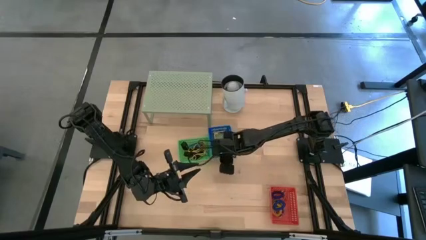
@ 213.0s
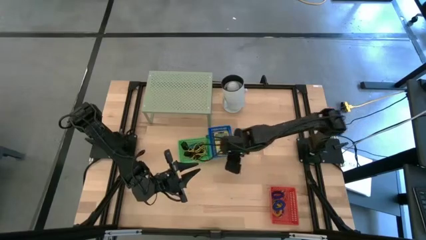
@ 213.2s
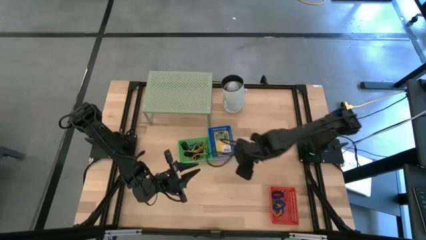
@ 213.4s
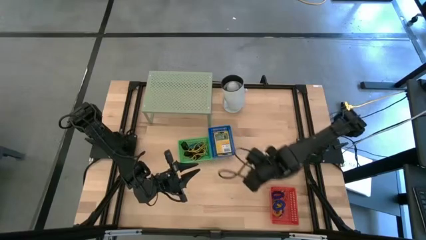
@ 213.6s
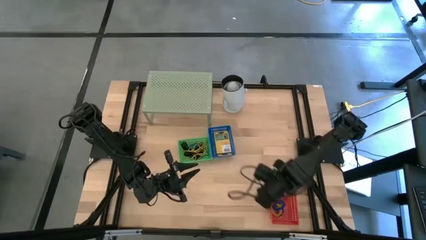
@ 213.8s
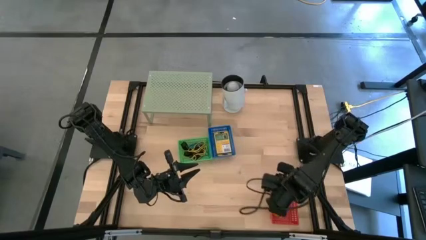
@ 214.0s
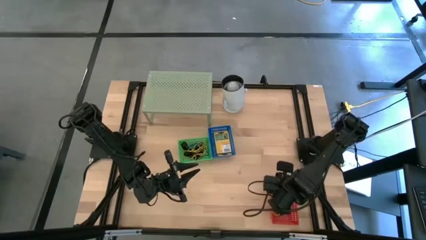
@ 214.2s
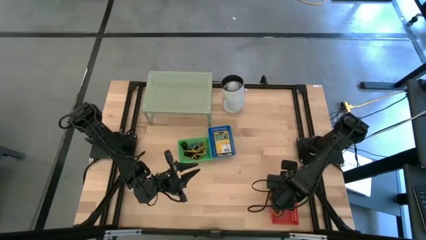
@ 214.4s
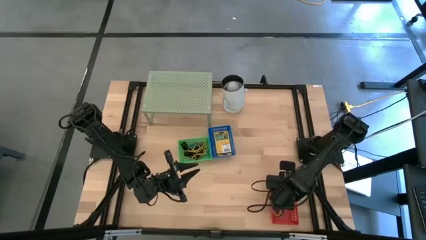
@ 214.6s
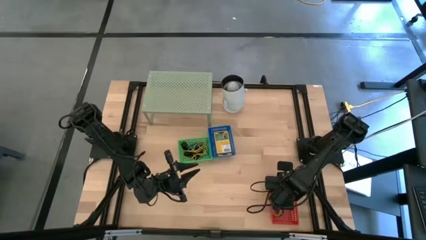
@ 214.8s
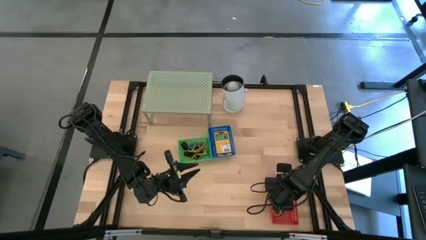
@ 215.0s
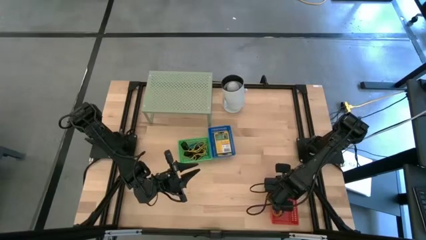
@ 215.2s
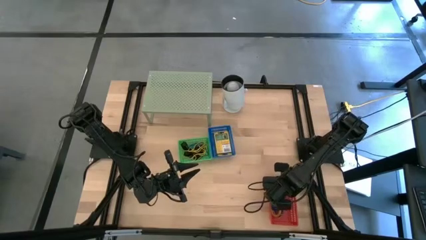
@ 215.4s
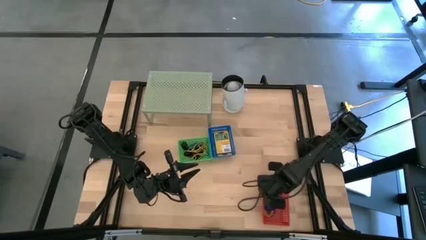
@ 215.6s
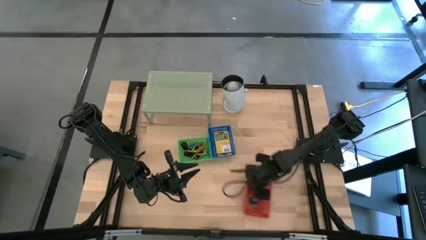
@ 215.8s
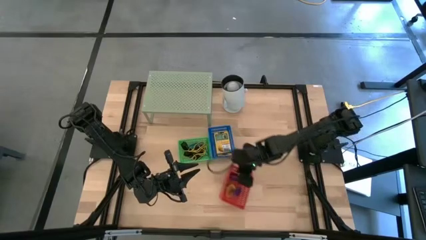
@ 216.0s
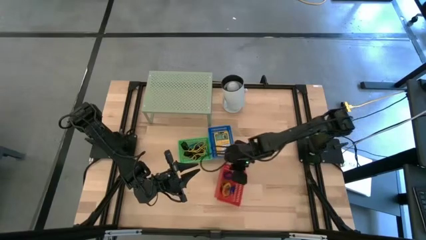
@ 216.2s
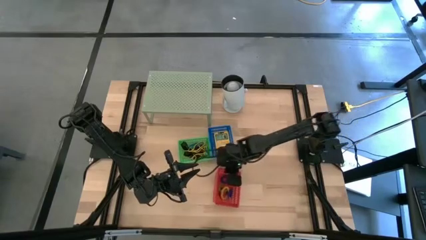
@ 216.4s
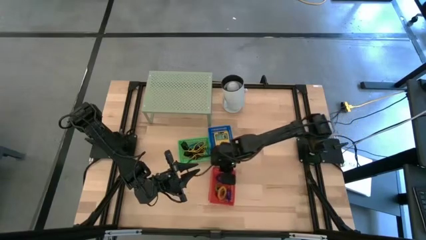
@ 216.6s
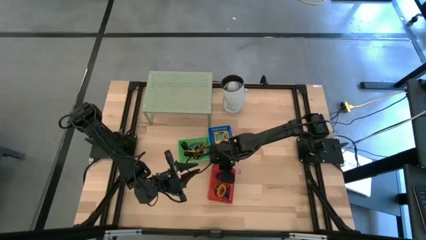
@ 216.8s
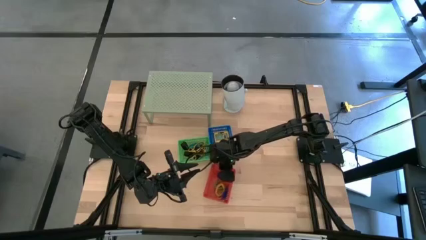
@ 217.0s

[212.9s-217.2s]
Task: Pick & Place Office Desk Supplies
Move the red bin to the center of the table

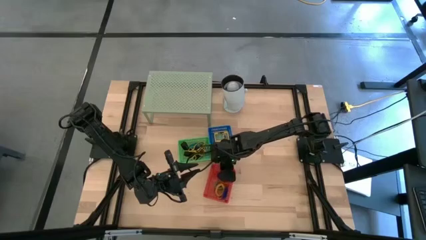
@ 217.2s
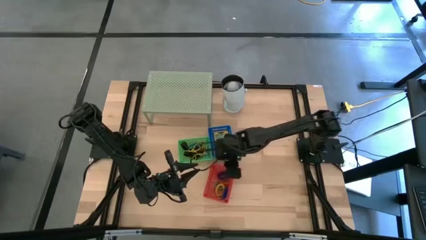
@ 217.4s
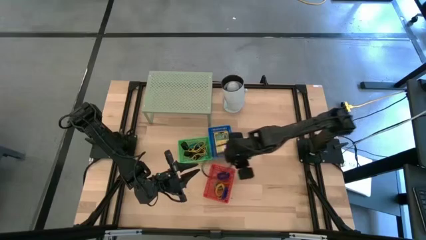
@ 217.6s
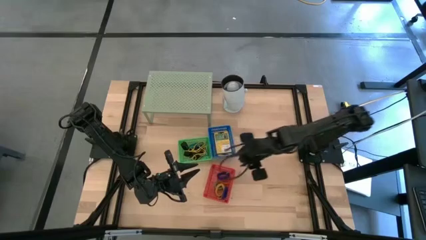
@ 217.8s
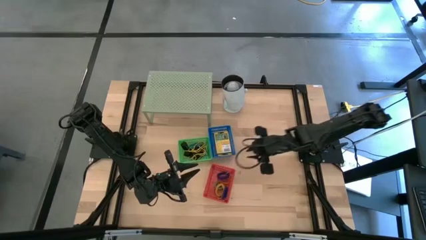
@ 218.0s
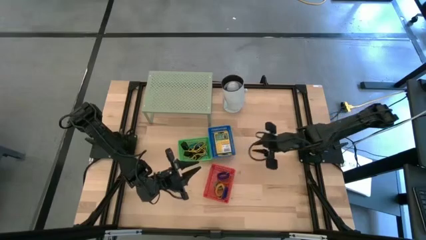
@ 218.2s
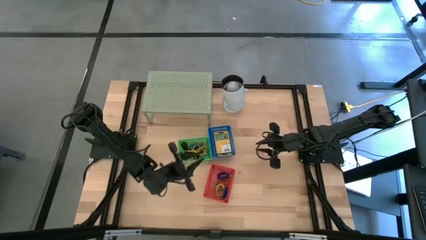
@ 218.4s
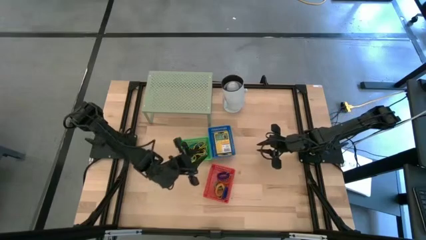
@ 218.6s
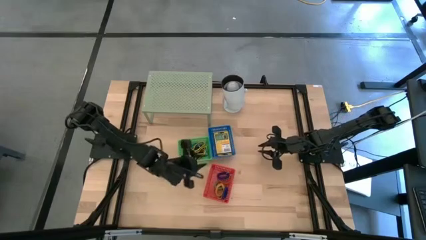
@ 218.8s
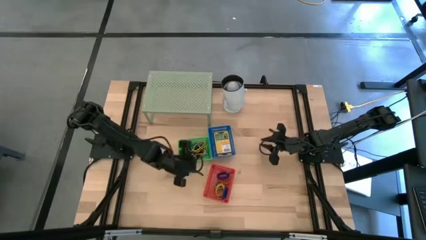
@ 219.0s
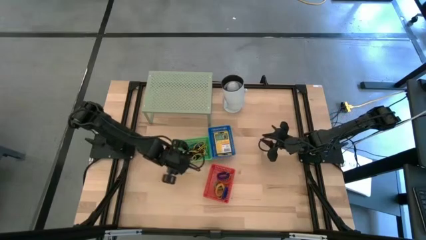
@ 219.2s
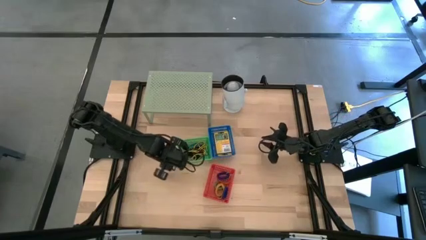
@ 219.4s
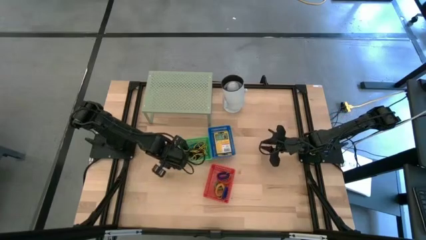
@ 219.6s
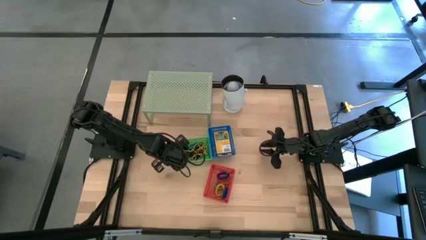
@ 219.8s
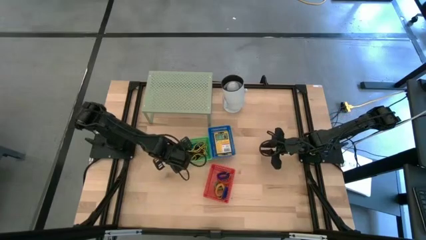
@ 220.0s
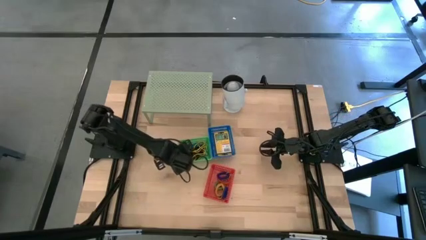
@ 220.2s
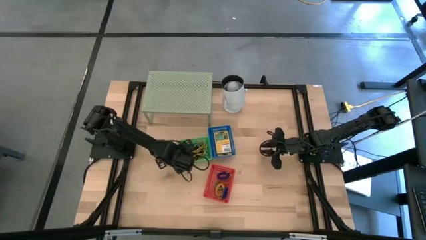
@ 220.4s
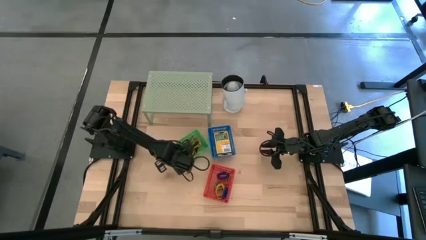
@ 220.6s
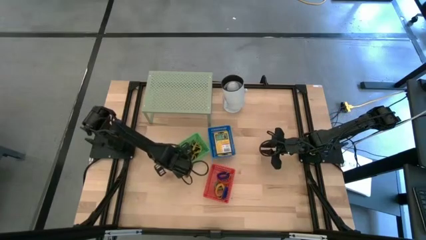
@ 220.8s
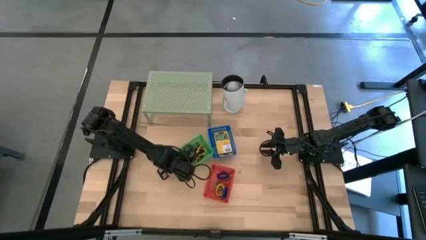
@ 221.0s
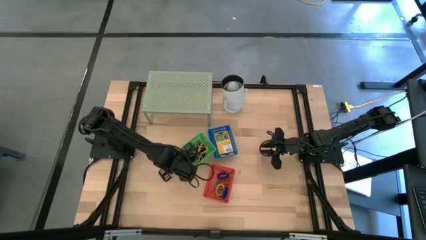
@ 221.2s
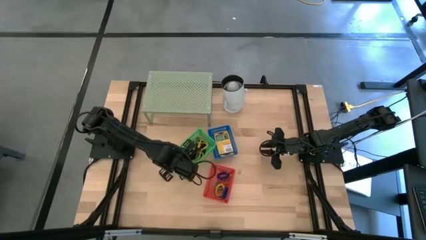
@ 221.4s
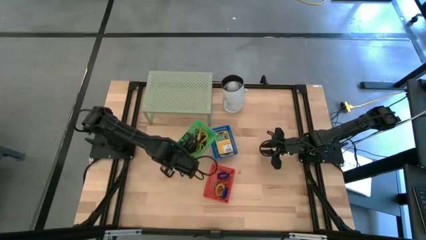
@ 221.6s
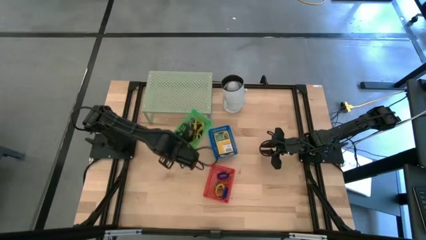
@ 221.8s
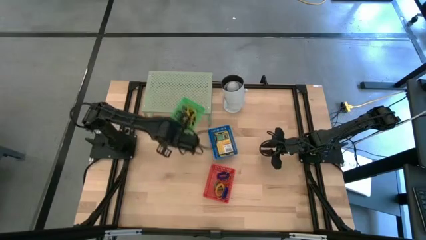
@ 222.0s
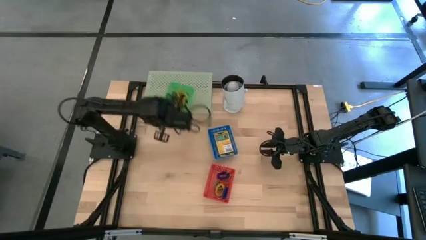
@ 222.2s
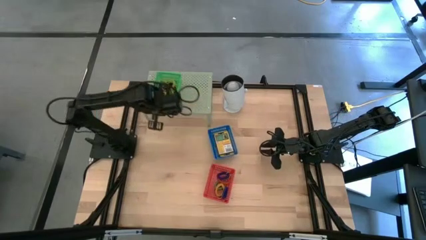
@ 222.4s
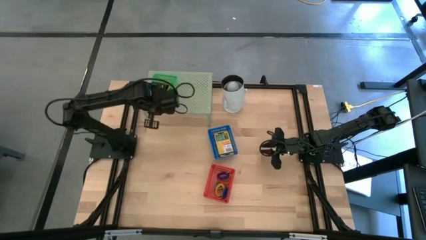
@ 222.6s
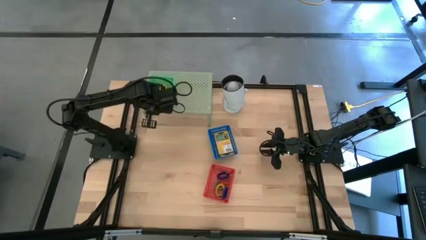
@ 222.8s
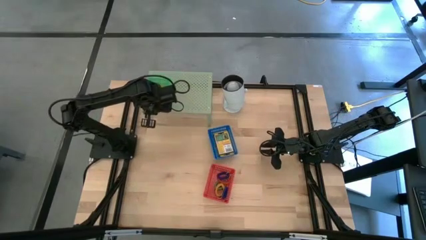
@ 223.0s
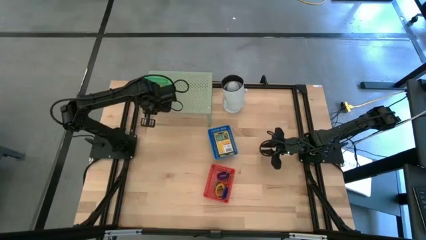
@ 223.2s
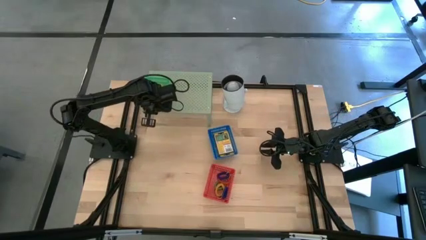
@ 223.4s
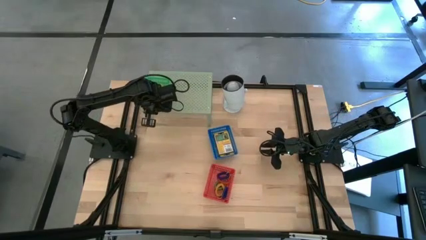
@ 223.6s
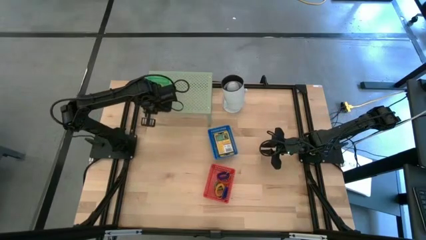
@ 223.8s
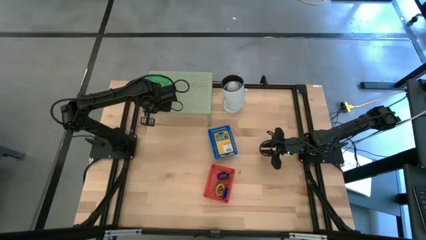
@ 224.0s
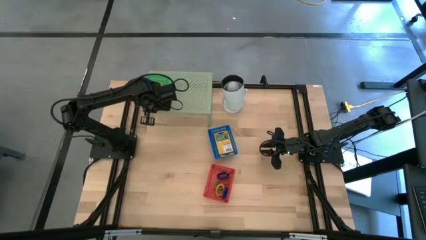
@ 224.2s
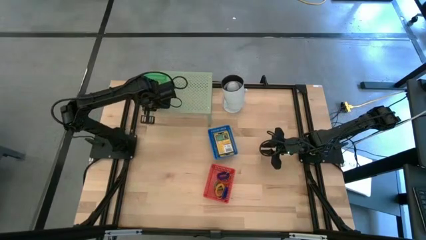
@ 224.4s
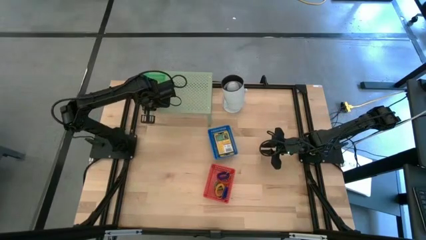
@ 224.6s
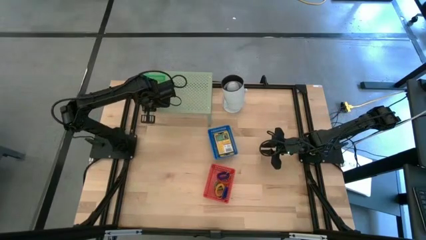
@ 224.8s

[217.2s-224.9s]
Put the green bin on the shelf

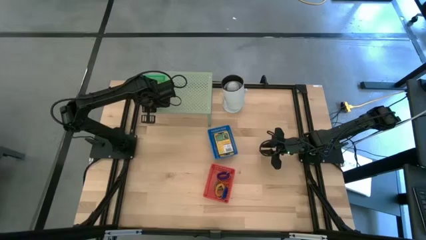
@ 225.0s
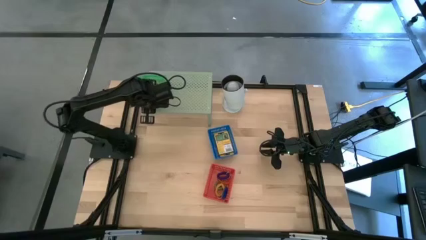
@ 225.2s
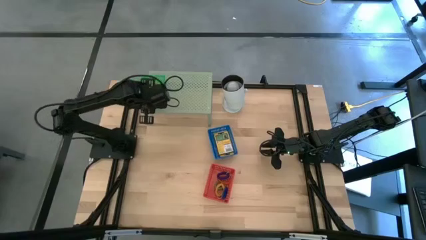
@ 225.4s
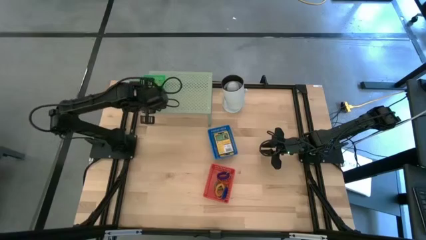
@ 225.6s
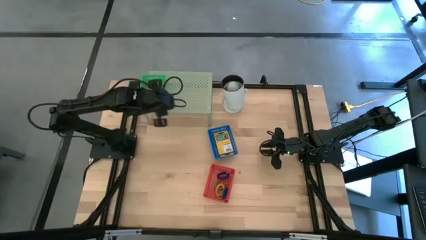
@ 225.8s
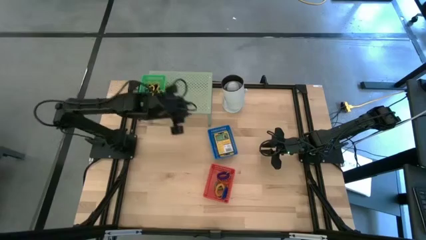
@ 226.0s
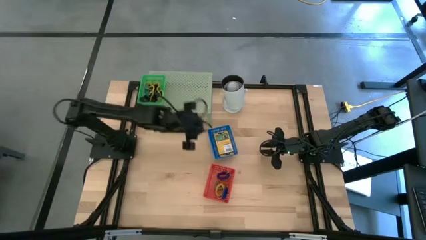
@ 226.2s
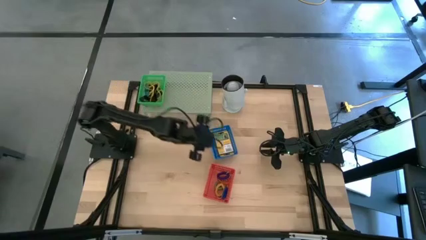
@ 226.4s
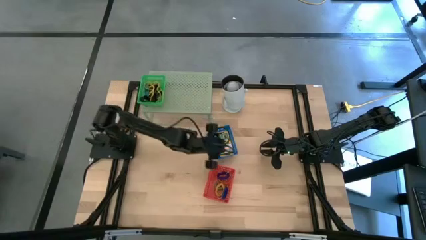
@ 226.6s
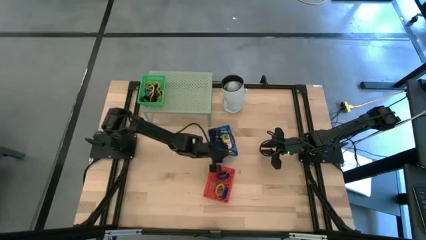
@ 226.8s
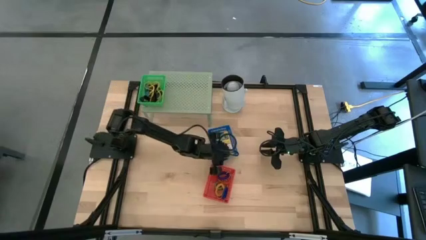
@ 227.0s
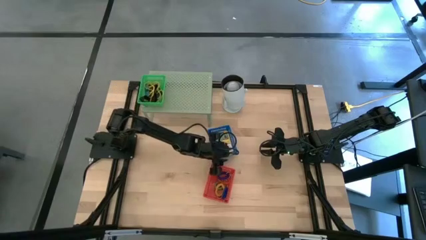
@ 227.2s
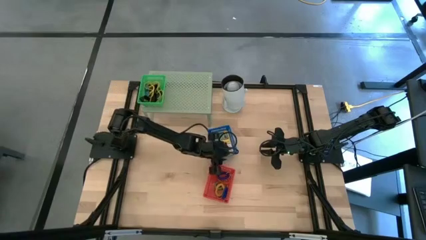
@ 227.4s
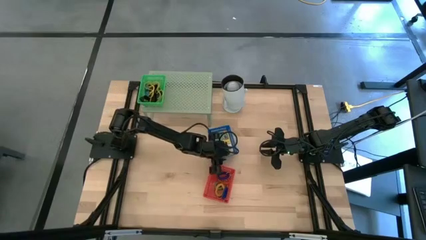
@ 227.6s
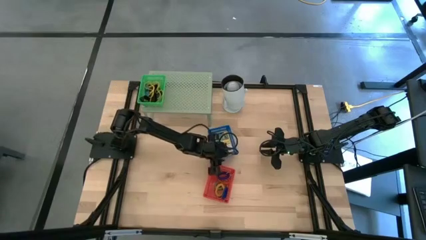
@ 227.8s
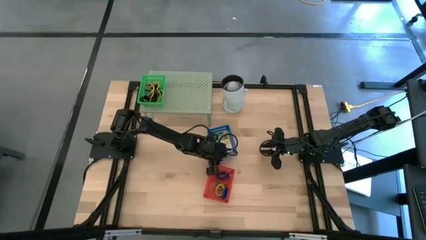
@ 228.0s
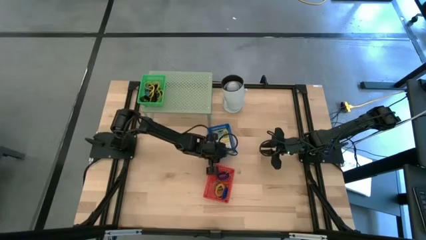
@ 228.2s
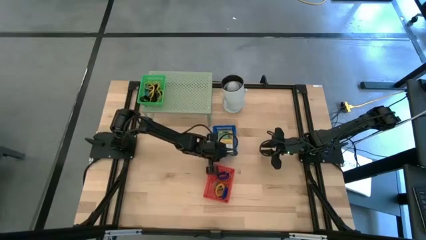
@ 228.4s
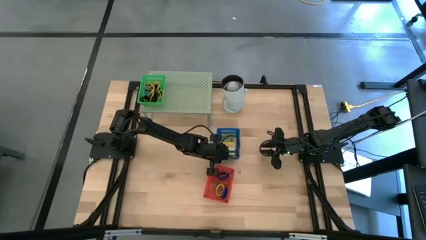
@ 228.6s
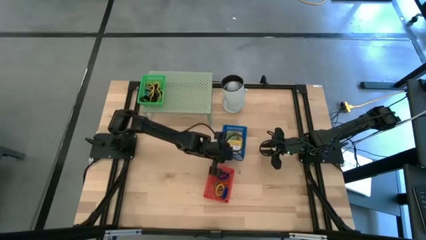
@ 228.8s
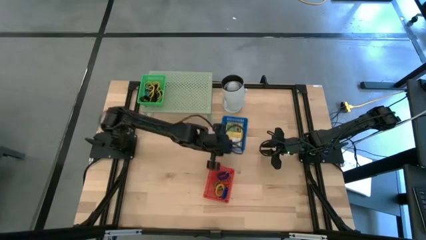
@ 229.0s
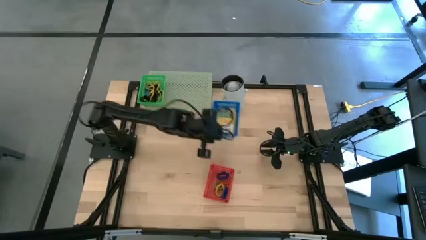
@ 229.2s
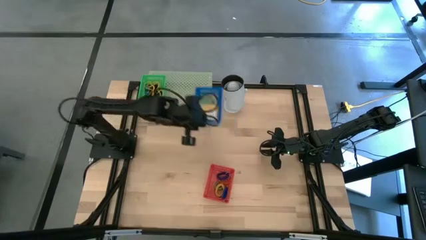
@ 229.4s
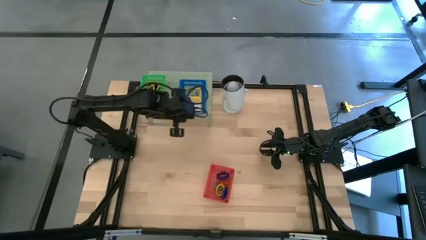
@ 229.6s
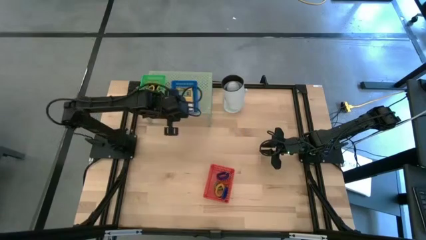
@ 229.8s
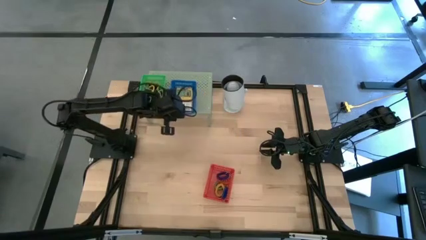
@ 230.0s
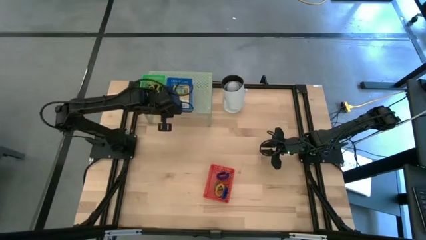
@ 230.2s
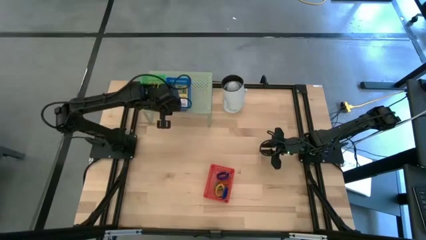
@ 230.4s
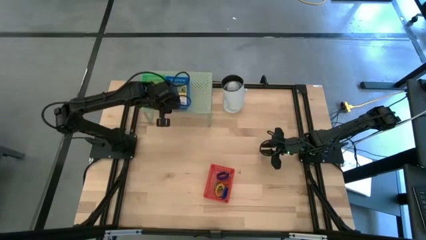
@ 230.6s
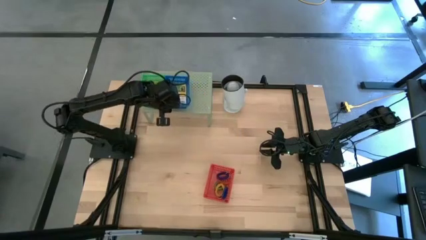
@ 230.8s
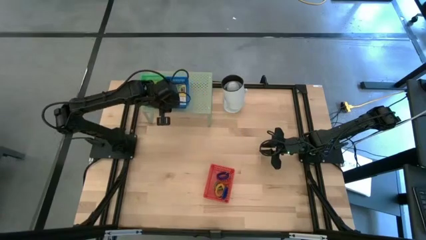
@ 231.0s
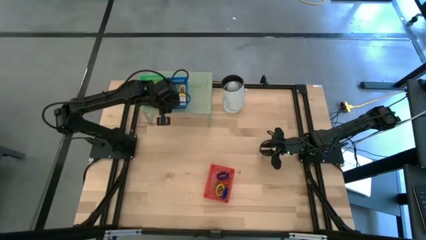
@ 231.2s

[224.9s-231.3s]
Put the blue bin on the shelf
